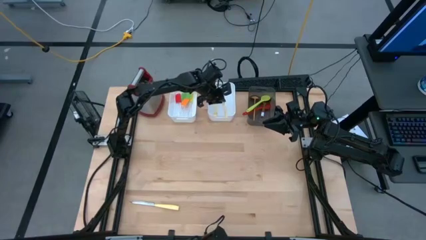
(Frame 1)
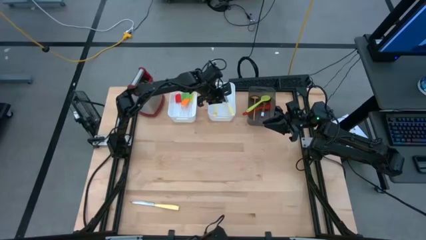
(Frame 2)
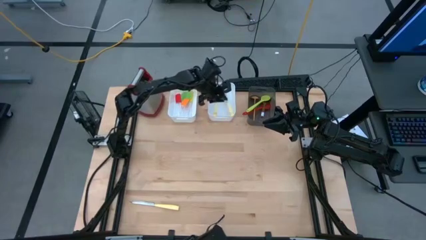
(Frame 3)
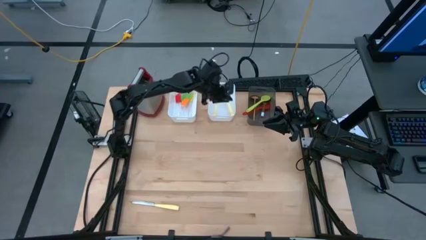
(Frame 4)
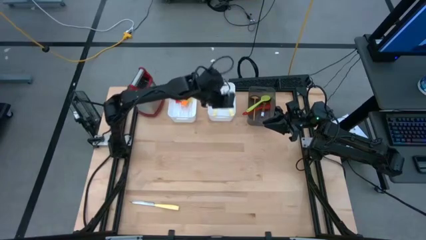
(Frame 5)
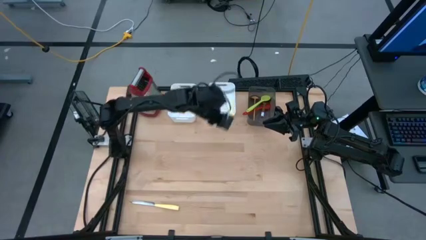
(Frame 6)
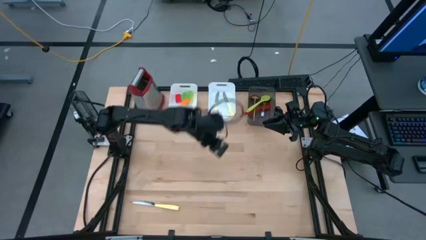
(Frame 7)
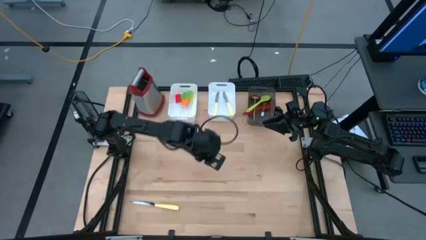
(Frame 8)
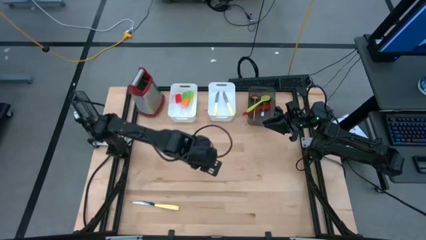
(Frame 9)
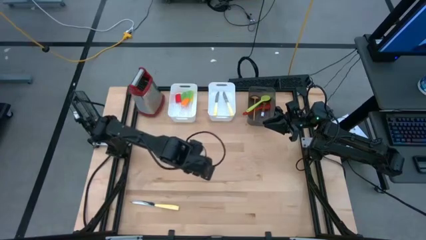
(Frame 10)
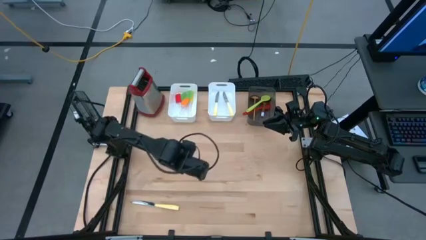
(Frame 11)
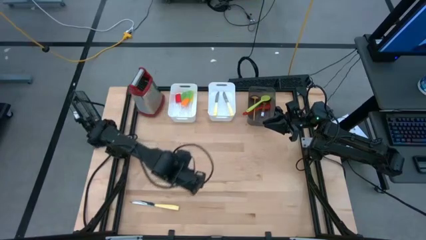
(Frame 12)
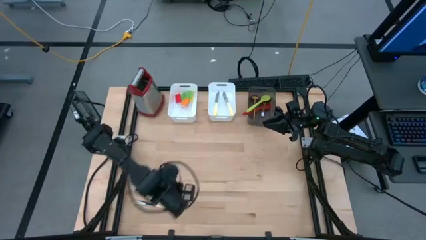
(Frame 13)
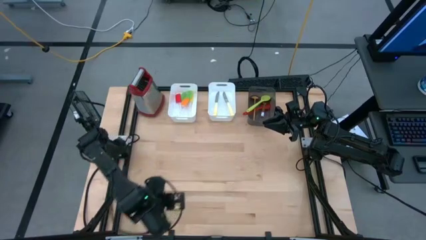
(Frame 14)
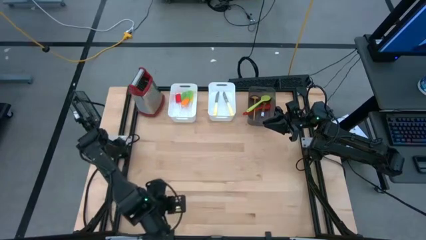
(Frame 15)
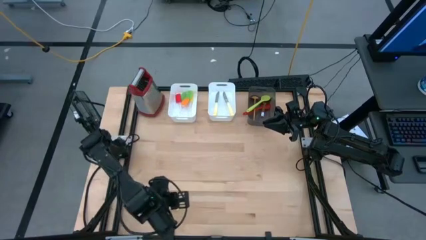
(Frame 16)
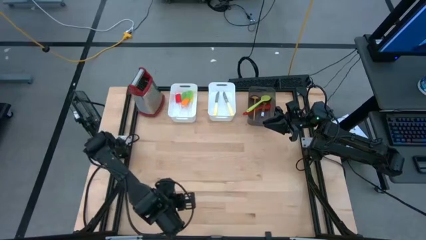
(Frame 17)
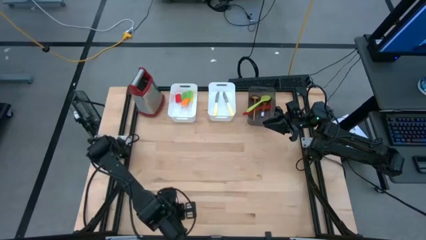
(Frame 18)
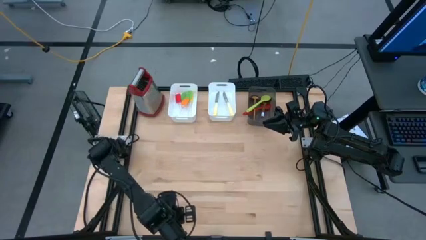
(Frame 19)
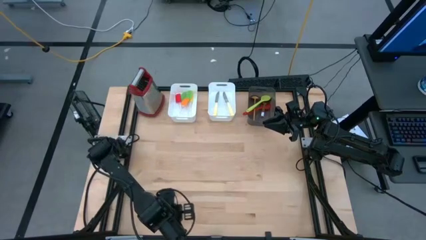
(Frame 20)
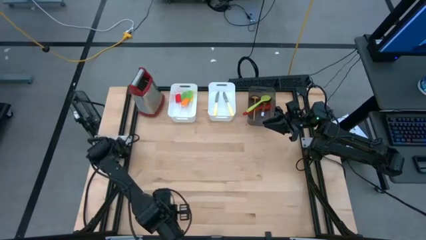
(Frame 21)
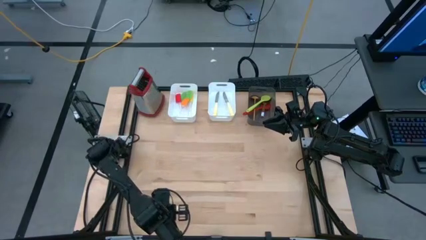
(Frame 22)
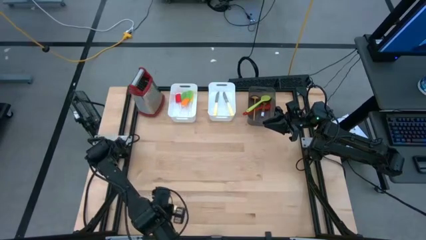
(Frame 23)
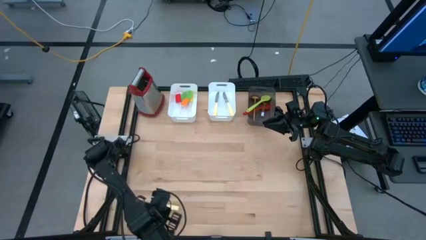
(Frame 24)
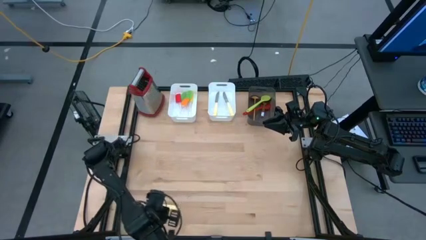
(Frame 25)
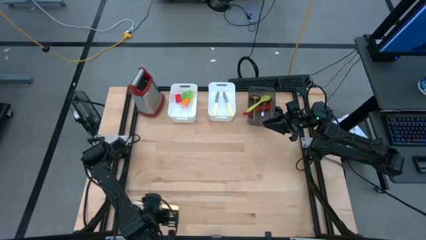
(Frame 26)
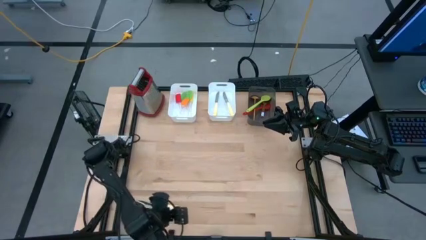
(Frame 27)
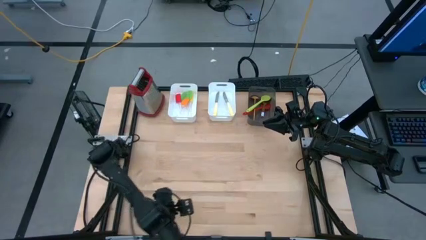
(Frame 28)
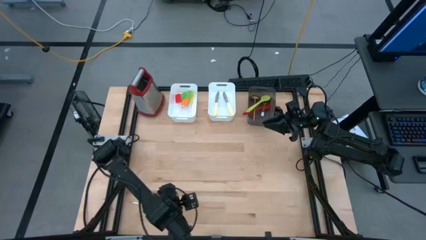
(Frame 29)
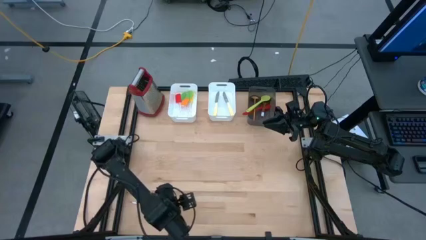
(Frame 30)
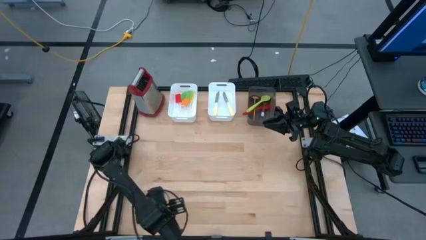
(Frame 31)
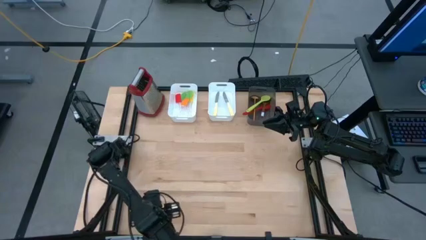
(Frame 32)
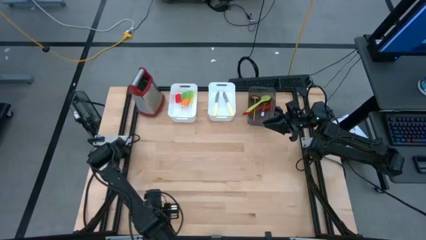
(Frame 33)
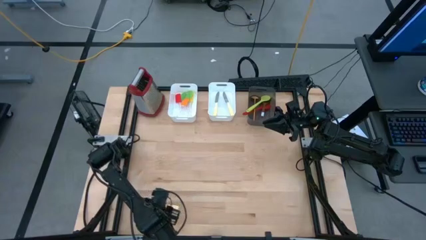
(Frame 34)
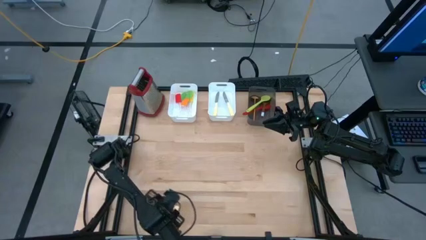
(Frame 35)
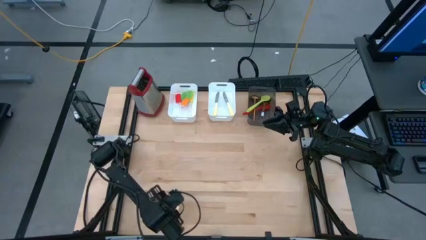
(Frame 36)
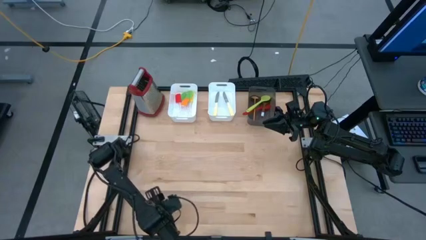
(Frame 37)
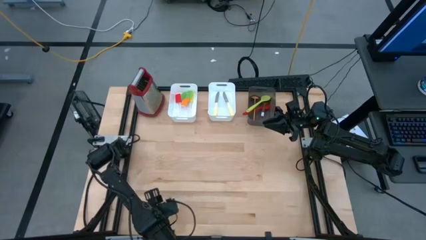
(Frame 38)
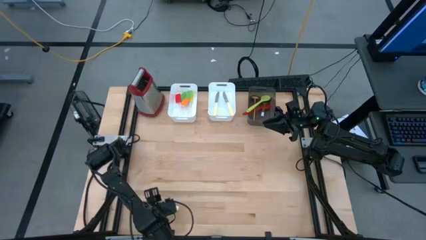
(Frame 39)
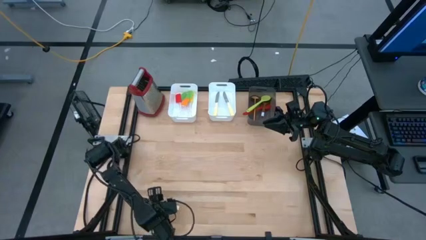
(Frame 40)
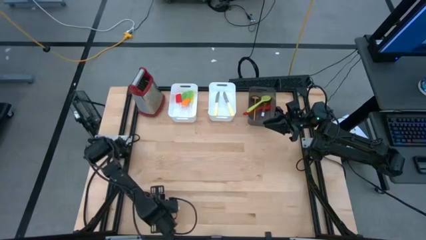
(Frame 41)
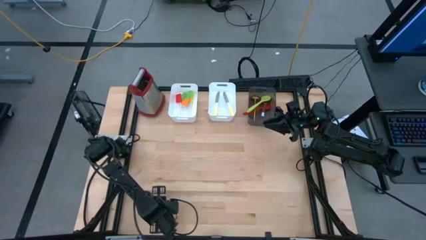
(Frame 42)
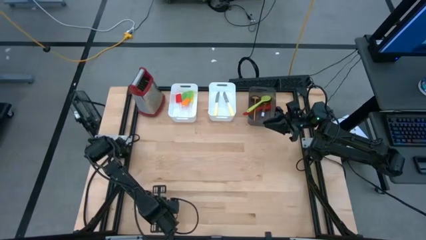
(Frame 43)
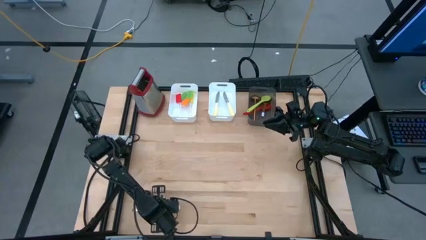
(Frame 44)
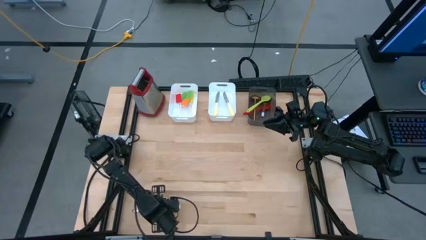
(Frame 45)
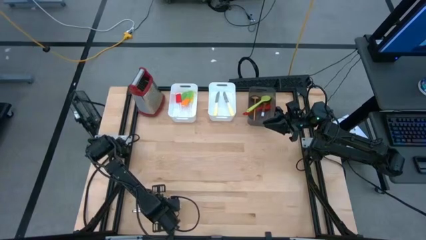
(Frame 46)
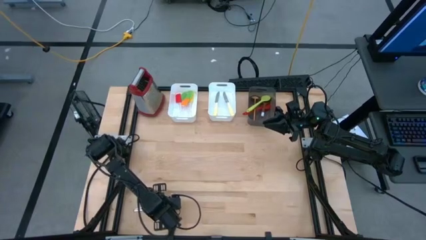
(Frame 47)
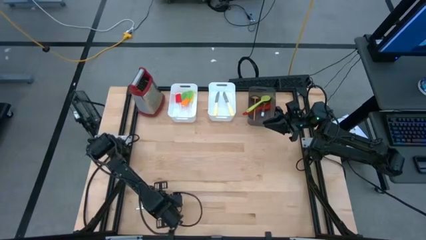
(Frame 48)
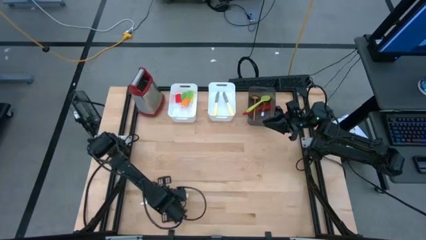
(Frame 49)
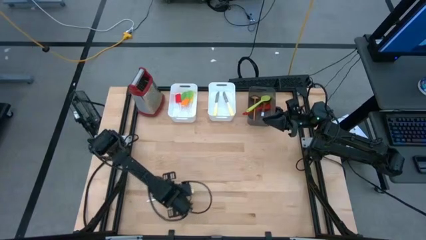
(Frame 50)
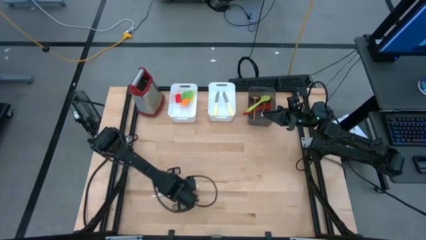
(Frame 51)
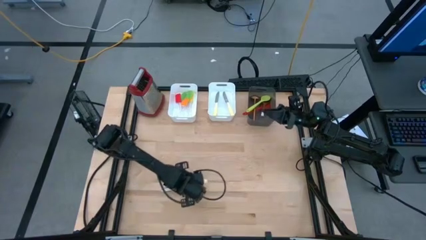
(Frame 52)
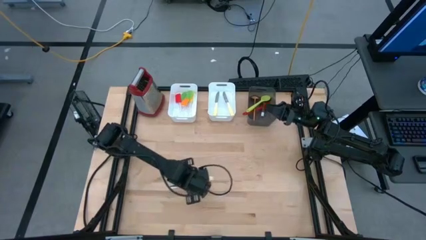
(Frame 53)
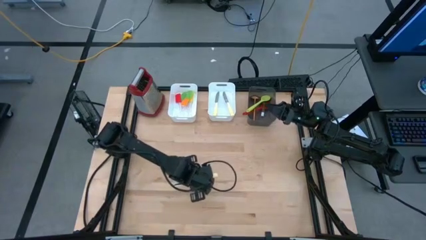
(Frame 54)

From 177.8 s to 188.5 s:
Task: Pick & Place Kitchen Items
Put the knife into the right white bin
